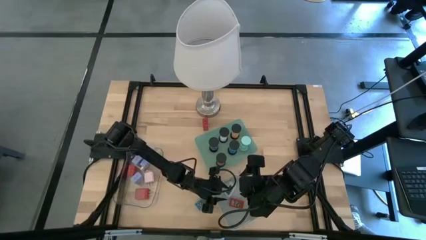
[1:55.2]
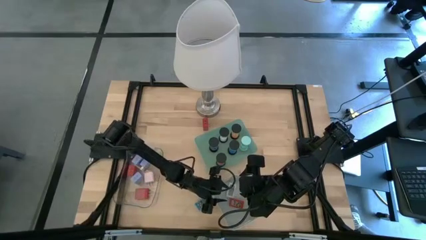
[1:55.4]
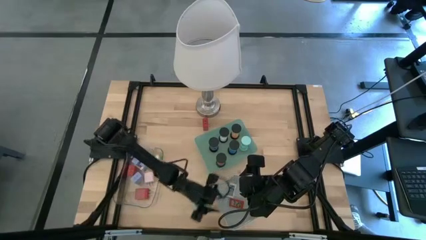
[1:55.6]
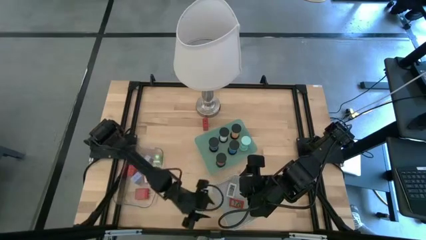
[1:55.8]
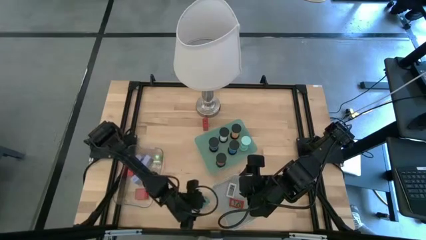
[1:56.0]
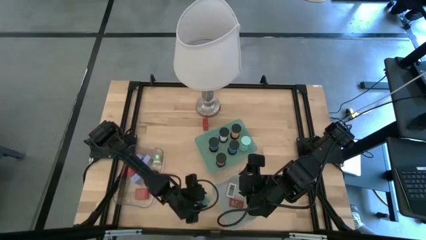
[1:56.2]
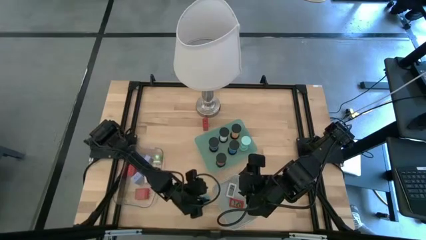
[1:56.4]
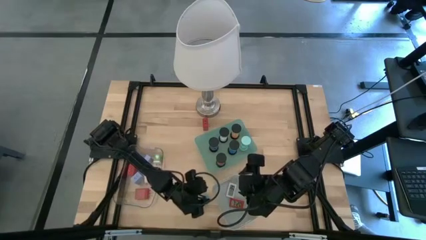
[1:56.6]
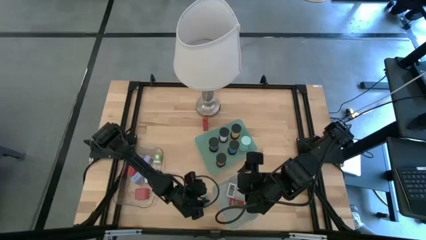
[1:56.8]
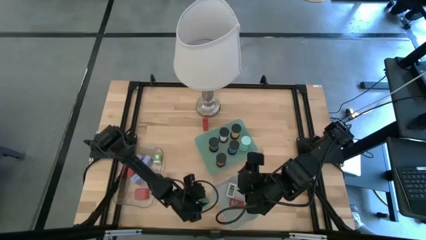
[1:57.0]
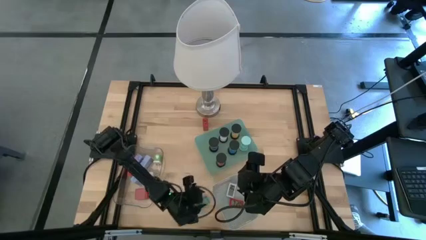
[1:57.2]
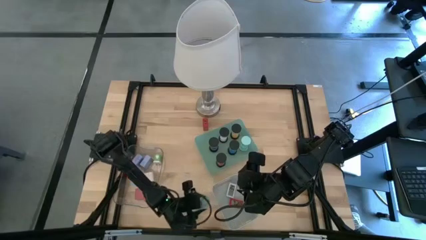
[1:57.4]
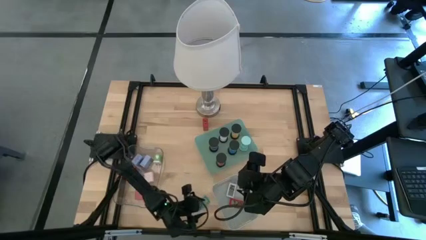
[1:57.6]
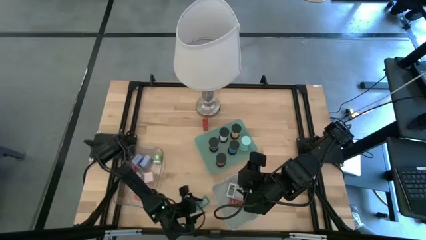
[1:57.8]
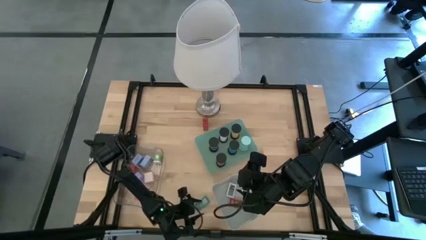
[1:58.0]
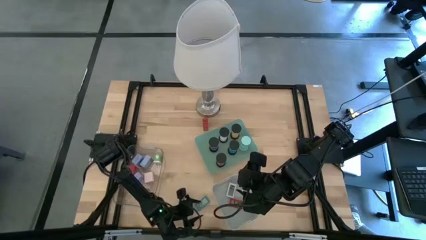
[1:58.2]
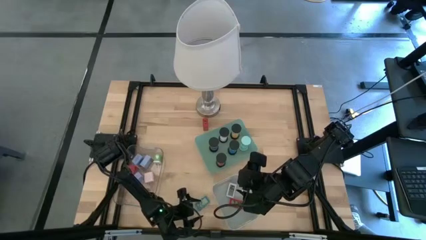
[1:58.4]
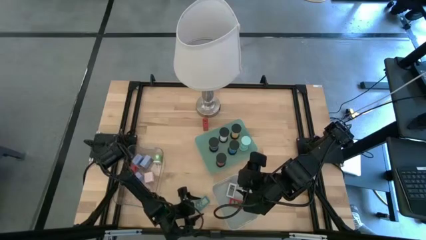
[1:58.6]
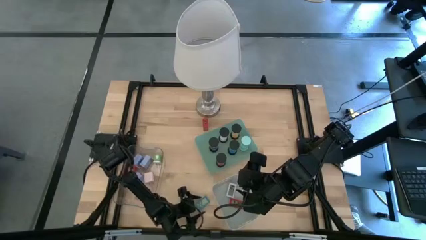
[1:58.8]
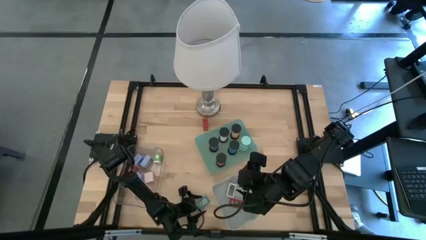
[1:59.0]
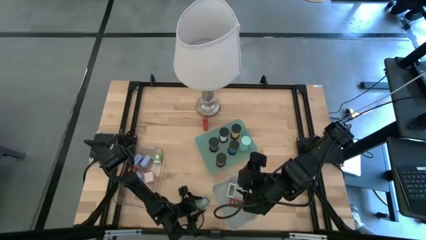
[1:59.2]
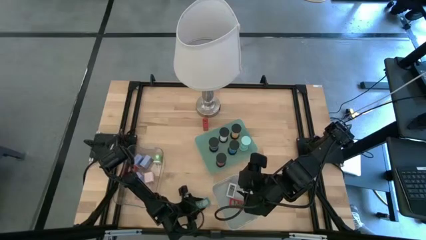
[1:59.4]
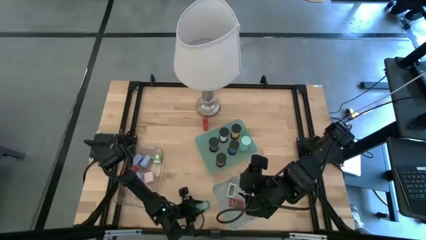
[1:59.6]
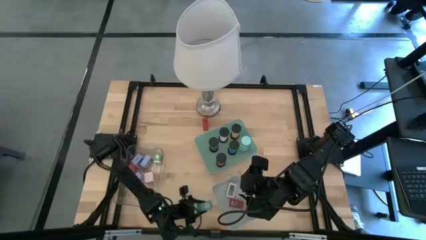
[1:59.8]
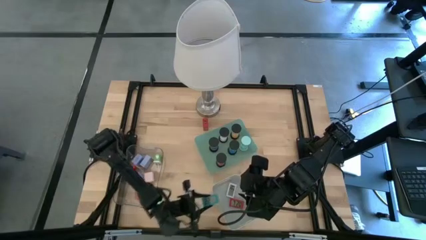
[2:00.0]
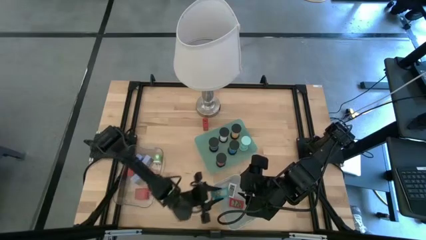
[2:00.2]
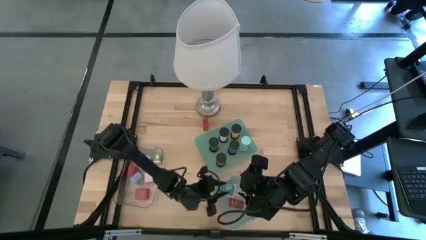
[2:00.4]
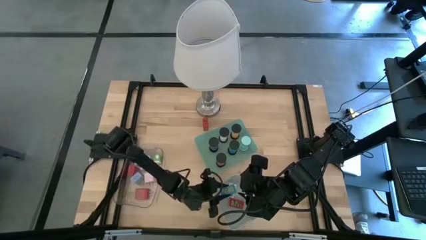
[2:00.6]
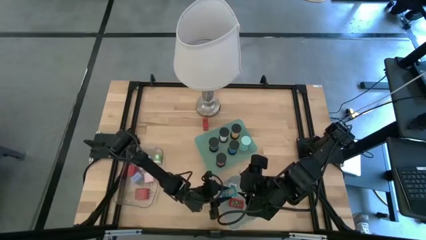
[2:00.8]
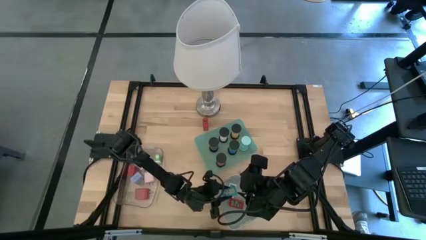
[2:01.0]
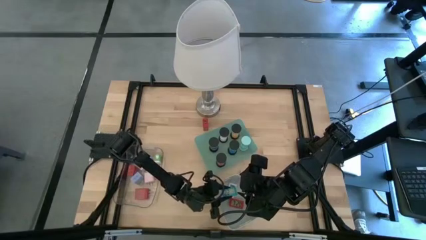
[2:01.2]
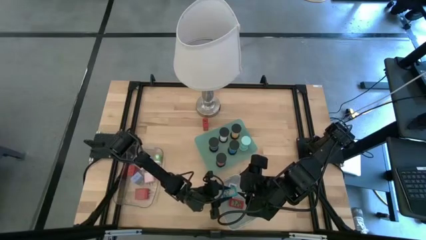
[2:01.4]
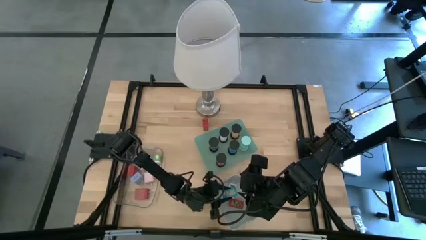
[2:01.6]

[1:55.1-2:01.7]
Task: Pick & Place Office items
Put the blue digital timer into the gray bin

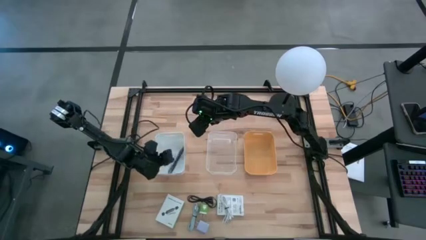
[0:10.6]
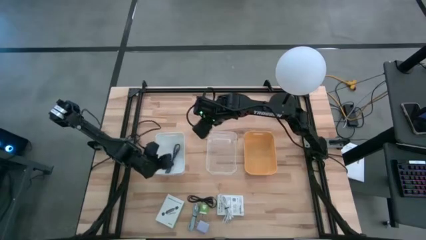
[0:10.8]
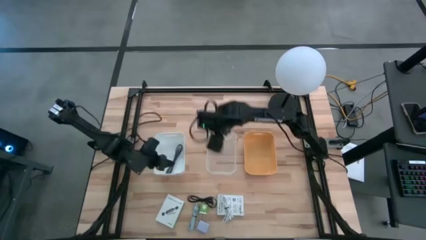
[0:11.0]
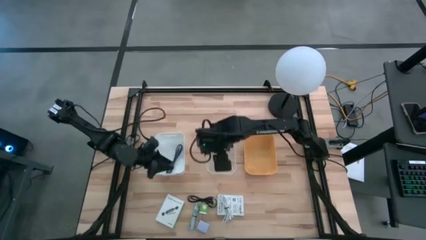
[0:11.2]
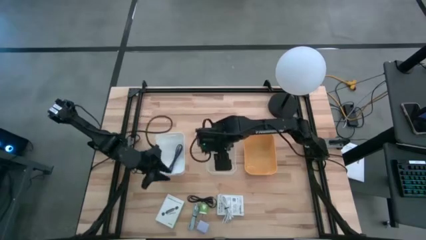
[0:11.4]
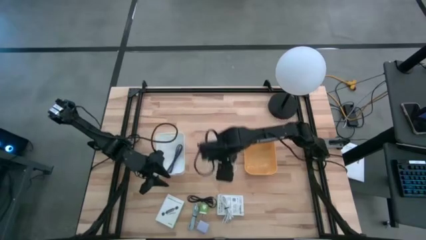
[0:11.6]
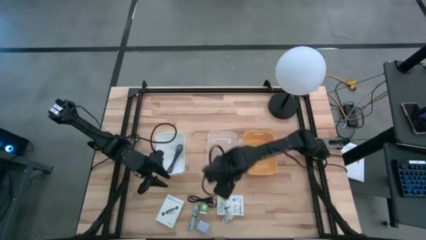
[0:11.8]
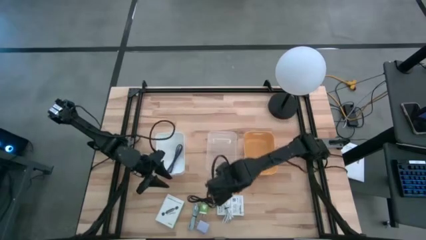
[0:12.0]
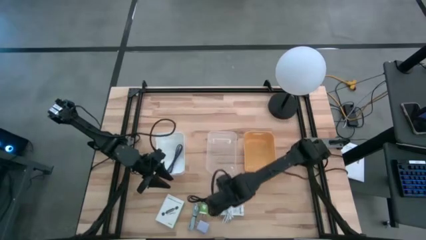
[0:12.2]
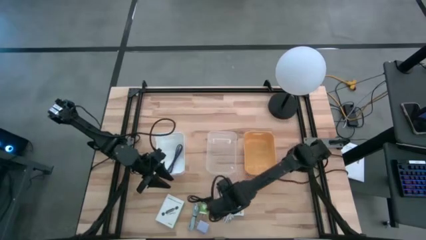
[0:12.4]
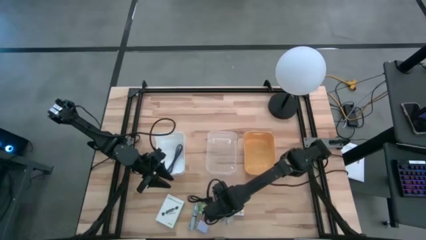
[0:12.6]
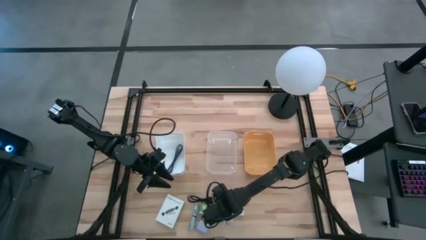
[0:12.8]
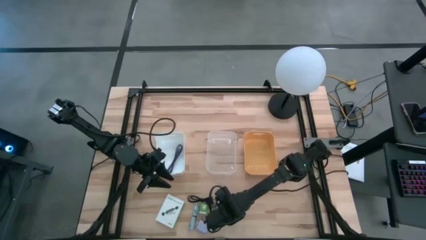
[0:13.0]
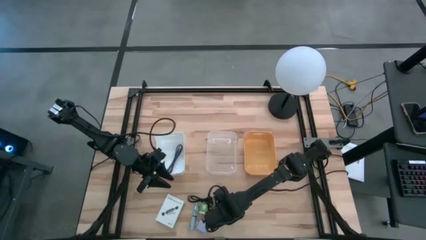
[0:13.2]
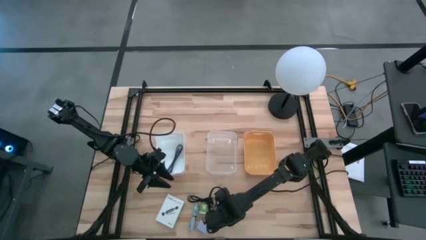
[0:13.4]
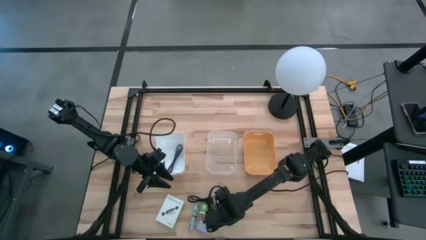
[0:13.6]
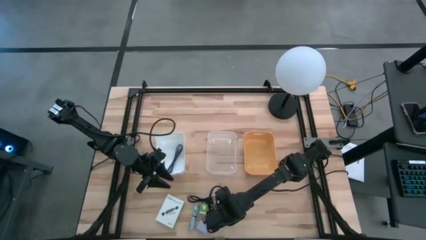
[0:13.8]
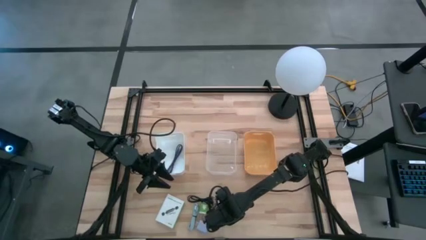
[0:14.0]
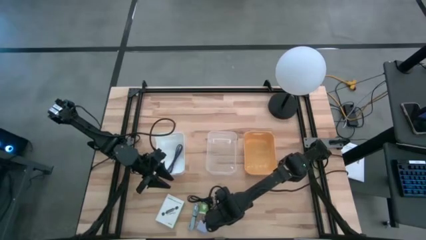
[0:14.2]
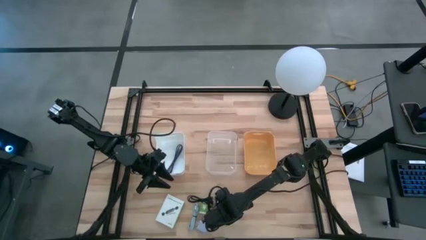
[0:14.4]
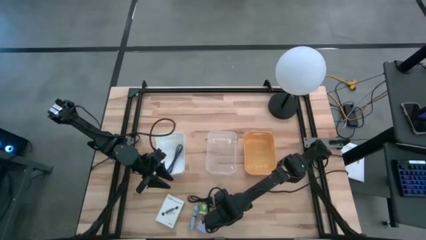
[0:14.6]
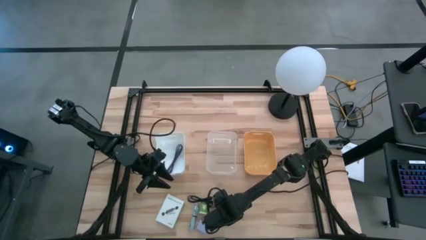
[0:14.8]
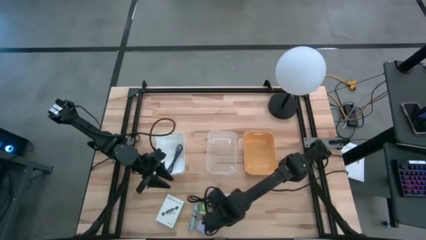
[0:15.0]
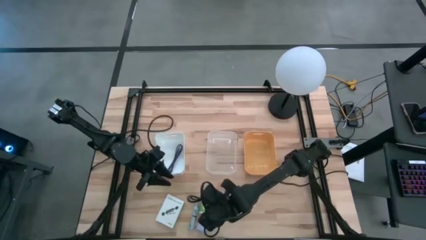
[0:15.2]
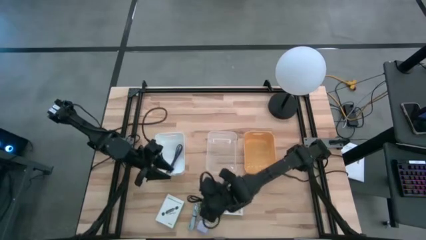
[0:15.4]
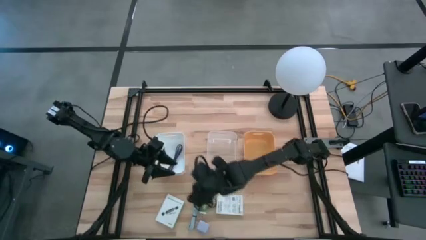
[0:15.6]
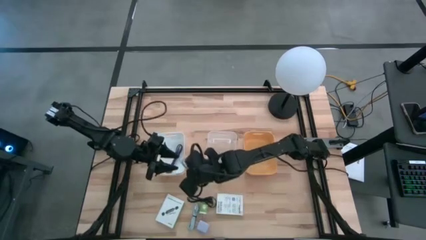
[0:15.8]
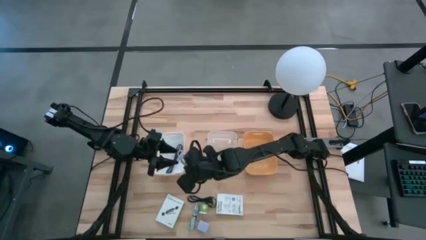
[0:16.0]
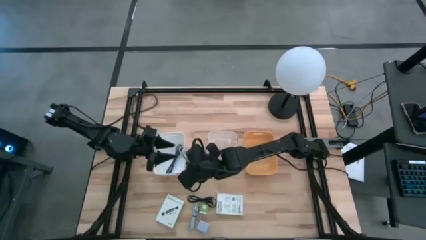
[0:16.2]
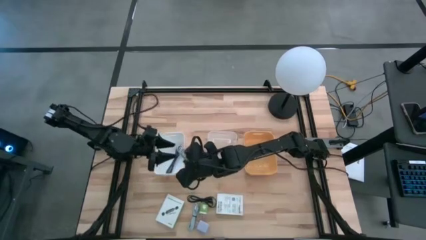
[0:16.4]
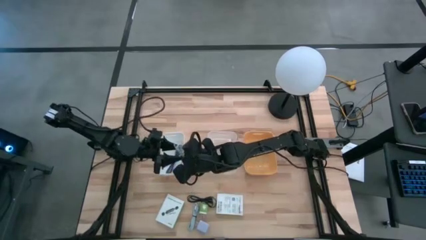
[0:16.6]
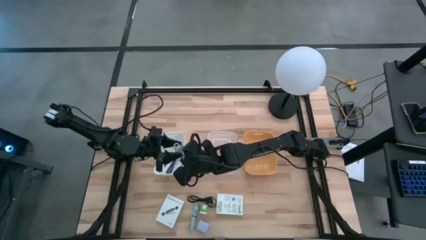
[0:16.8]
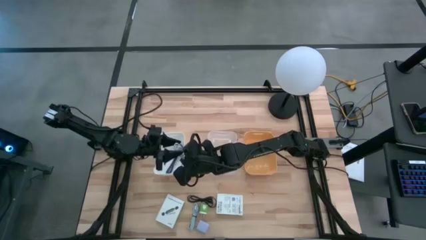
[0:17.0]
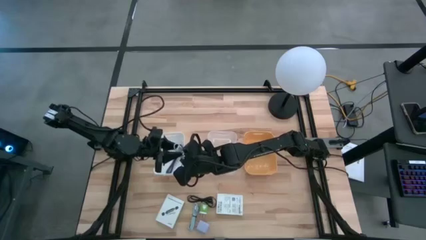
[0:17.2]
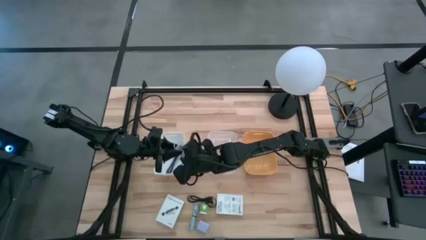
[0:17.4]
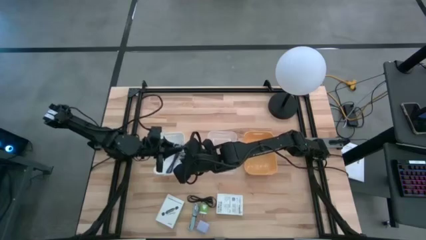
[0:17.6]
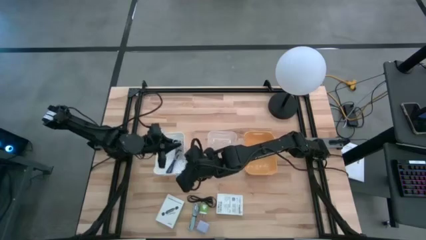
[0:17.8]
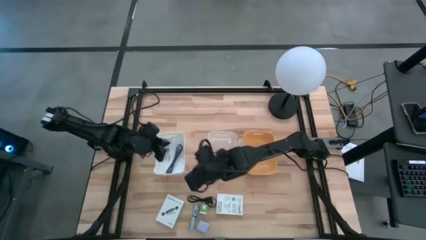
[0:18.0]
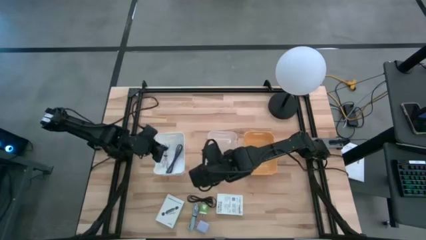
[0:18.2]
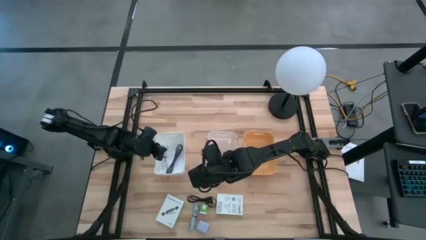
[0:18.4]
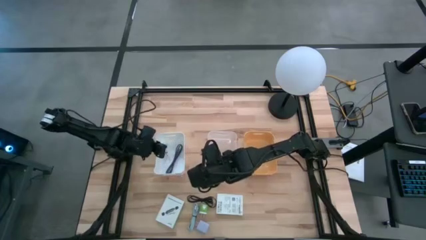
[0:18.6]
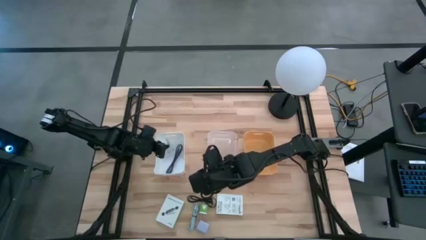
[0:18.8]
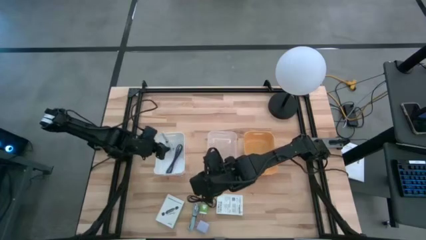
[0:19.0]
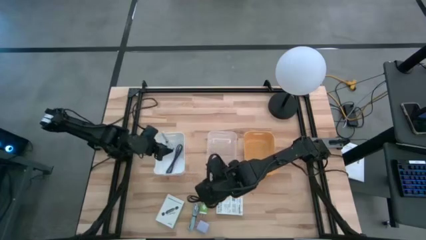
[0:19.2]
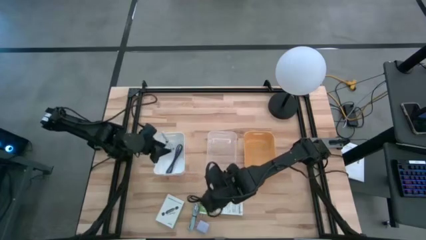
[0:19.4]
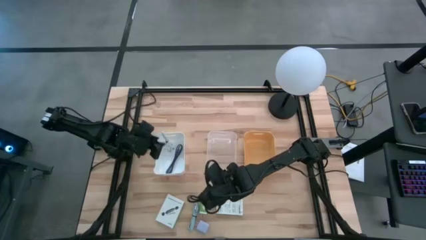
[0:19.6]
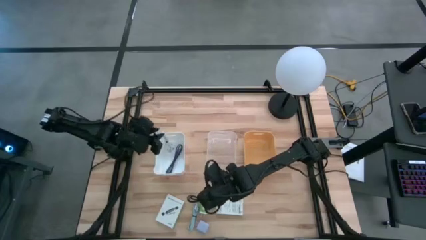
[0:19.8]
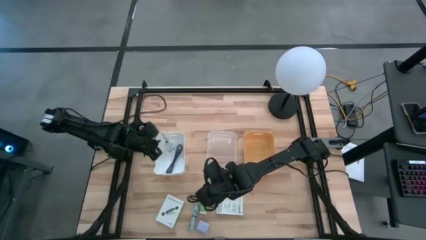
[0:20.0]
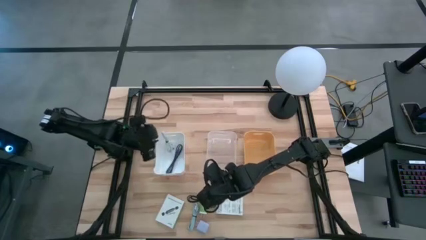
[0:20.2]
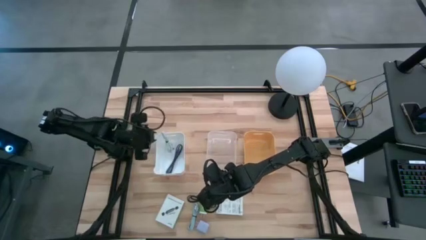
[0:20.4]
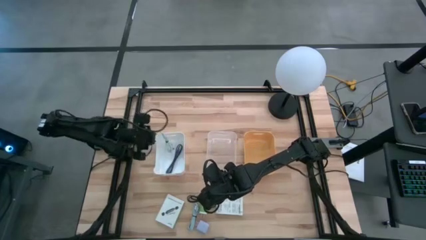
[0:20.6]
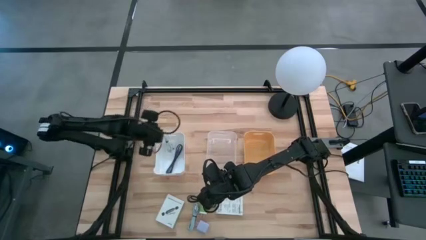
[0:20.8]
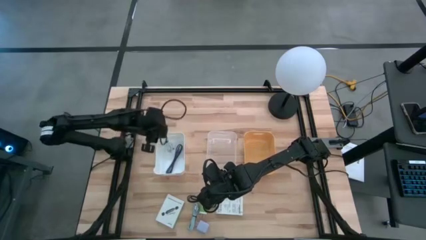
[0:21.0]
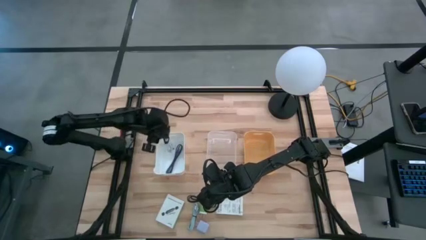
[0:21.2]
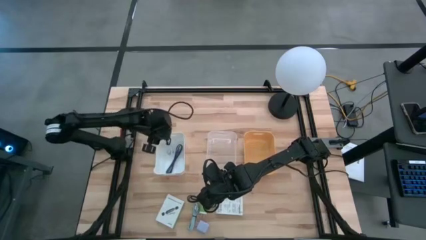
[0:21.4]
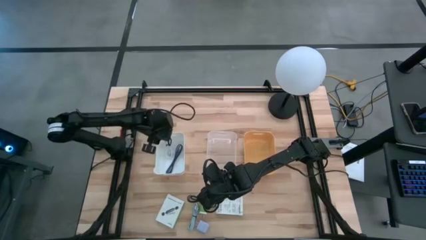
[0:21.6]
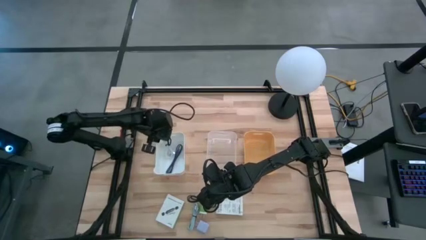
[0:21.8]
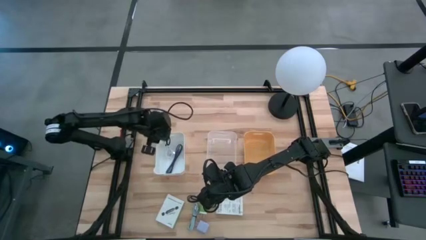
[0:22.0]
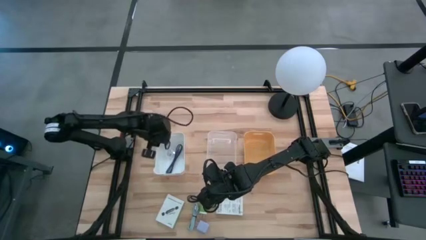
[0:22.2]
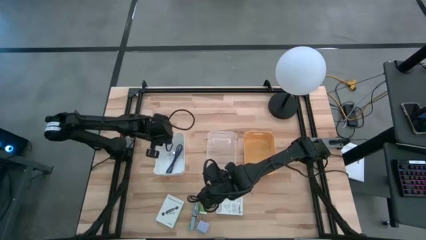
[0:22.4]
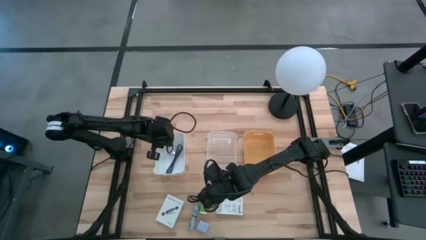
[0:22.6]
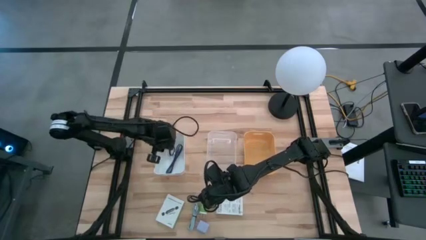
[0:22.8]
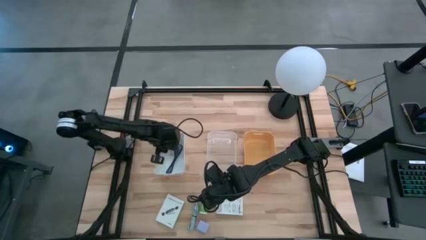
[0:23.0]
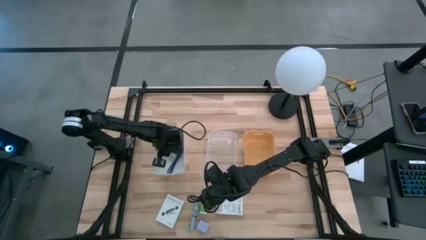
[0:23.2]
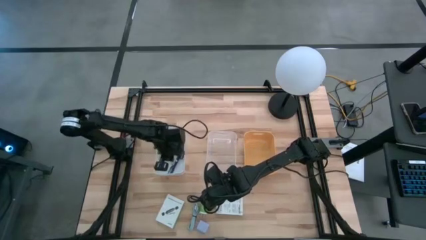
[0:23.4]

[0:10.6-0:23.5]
Task: Pick and place items into bin
Put the white charger cable into the white bin
